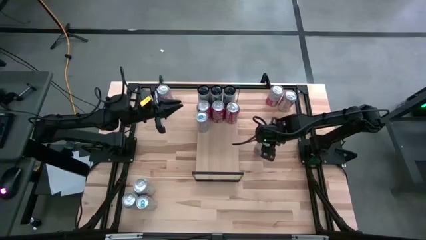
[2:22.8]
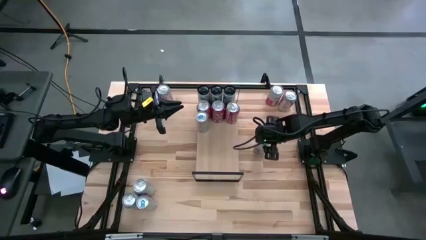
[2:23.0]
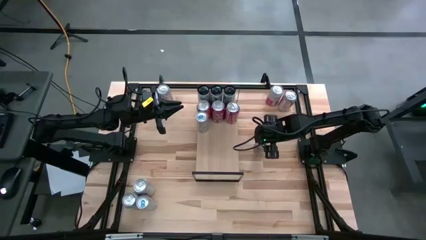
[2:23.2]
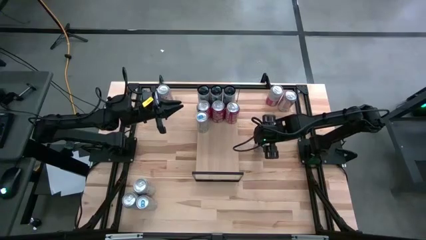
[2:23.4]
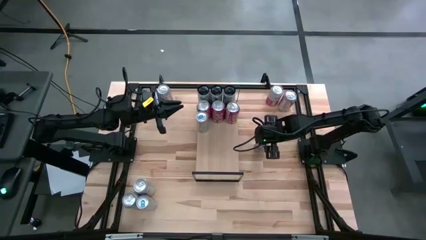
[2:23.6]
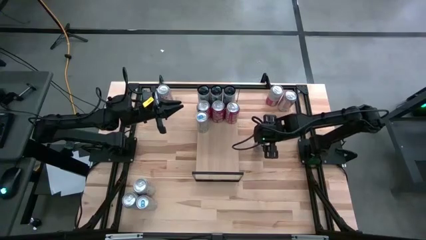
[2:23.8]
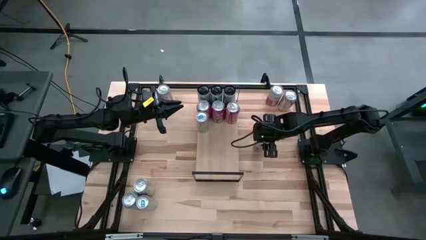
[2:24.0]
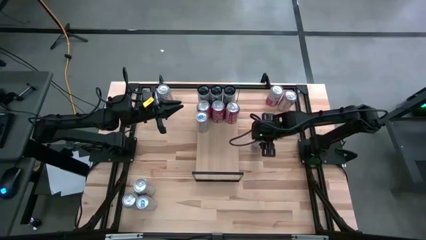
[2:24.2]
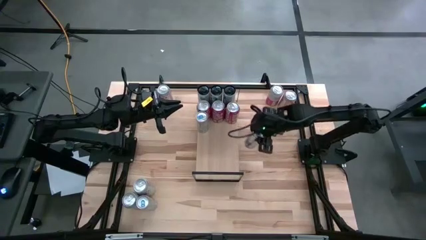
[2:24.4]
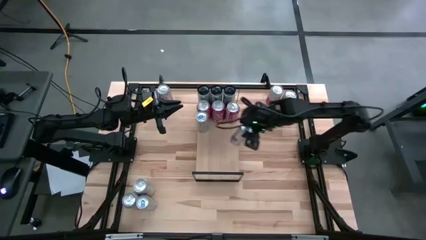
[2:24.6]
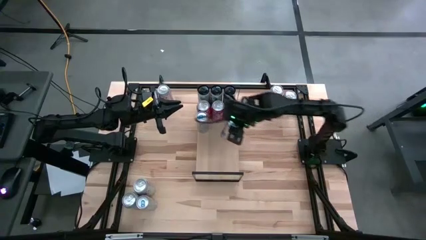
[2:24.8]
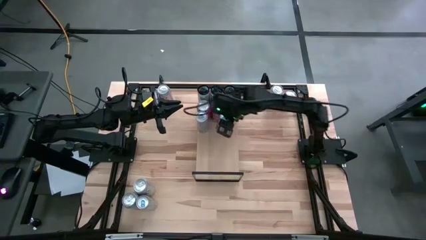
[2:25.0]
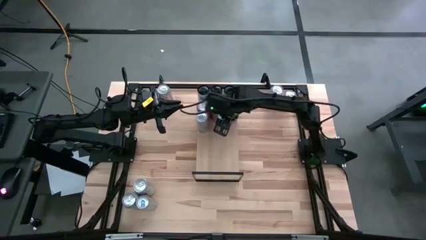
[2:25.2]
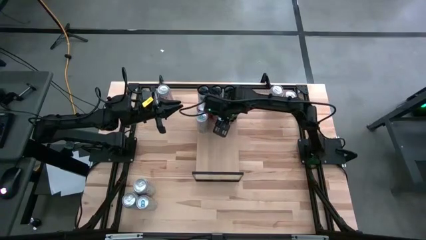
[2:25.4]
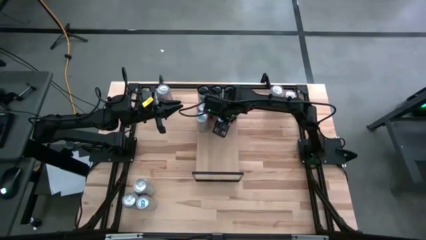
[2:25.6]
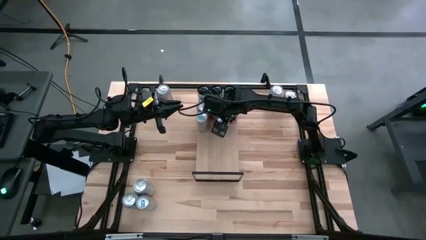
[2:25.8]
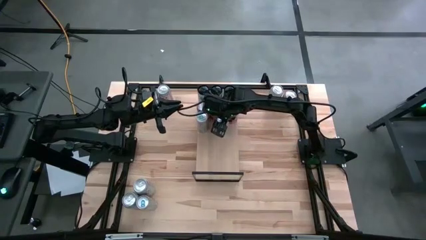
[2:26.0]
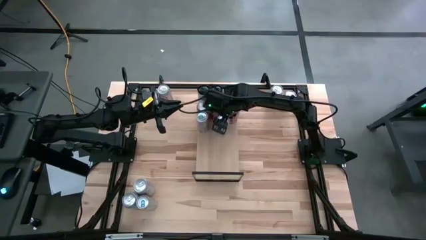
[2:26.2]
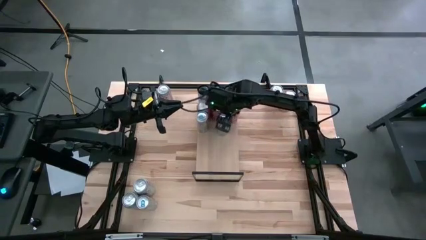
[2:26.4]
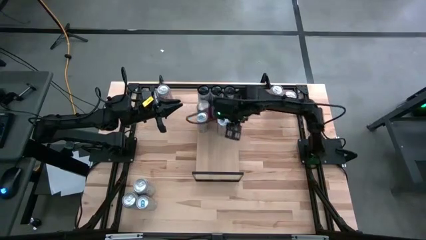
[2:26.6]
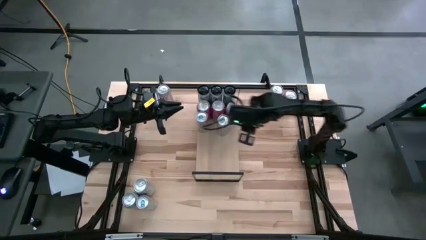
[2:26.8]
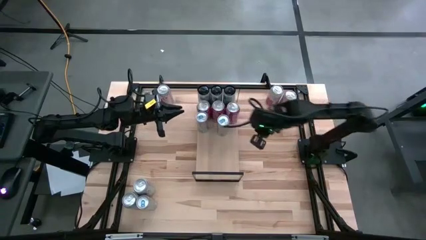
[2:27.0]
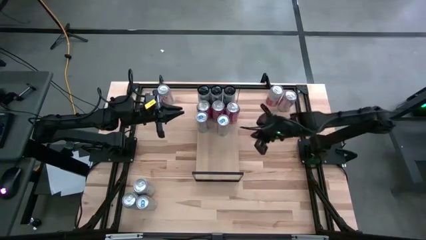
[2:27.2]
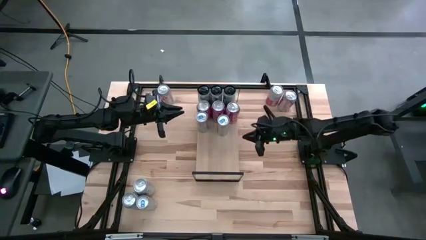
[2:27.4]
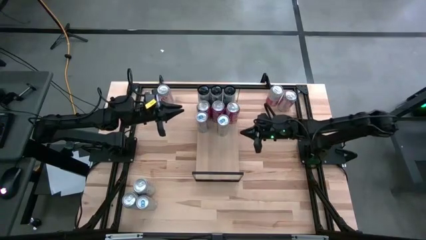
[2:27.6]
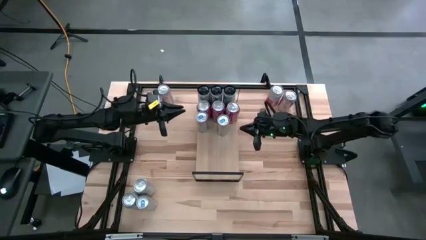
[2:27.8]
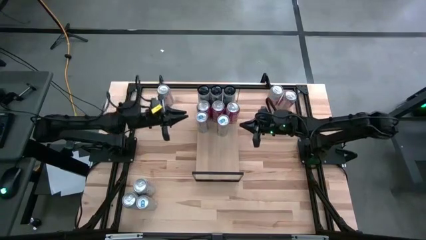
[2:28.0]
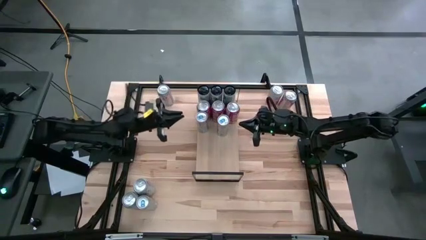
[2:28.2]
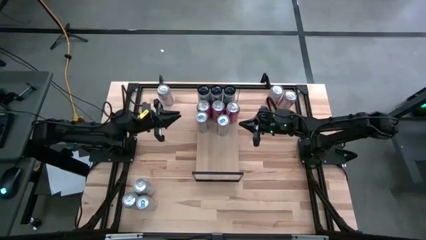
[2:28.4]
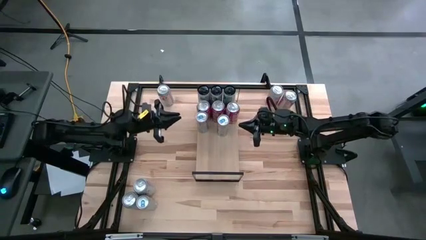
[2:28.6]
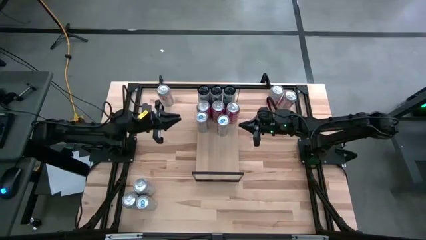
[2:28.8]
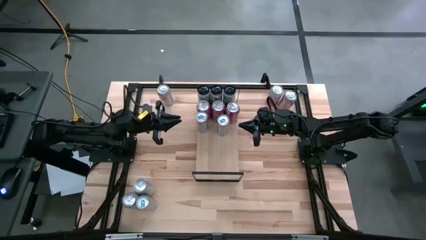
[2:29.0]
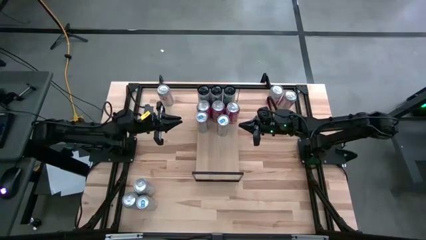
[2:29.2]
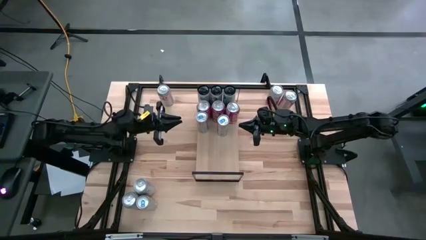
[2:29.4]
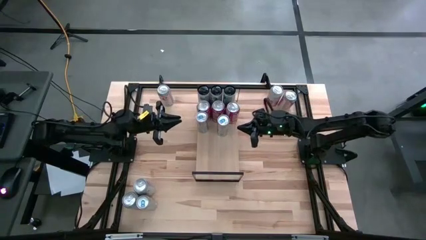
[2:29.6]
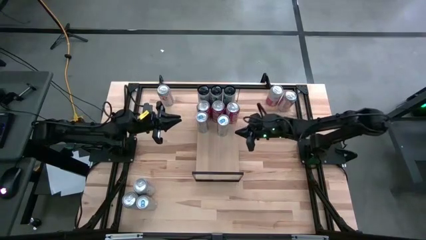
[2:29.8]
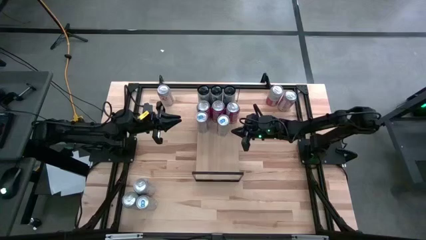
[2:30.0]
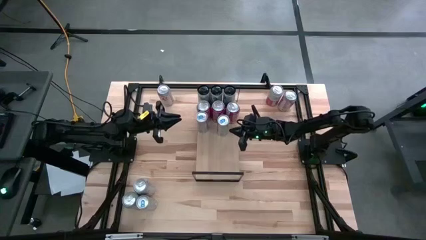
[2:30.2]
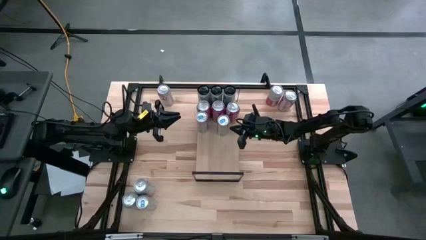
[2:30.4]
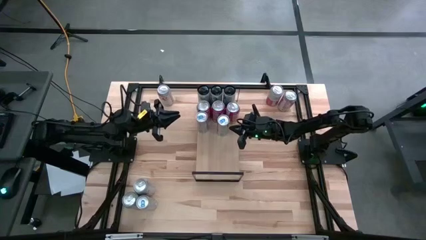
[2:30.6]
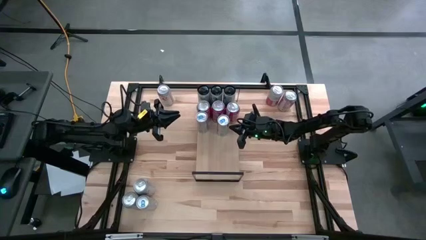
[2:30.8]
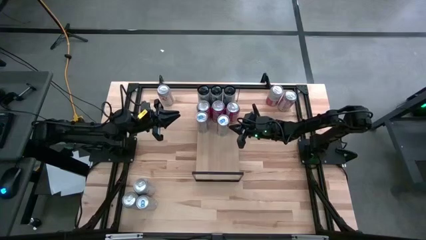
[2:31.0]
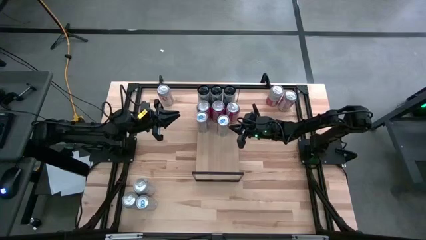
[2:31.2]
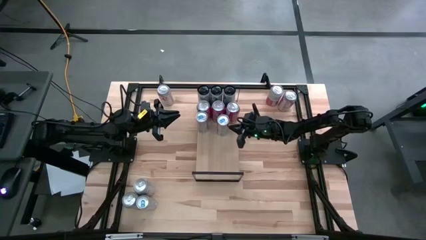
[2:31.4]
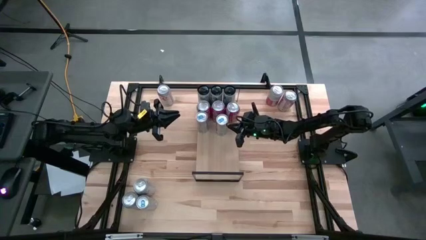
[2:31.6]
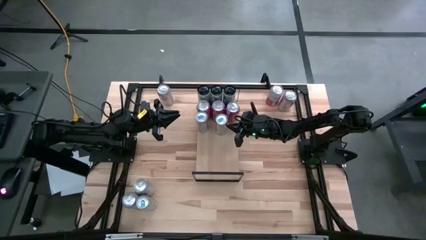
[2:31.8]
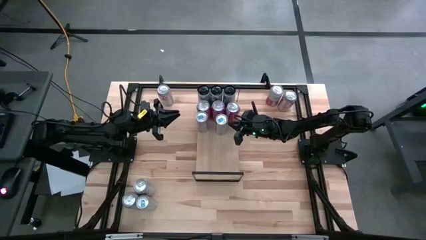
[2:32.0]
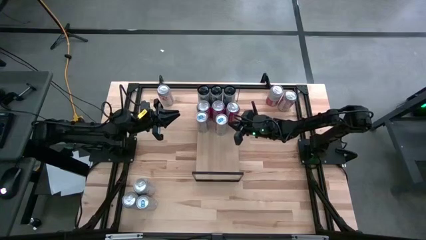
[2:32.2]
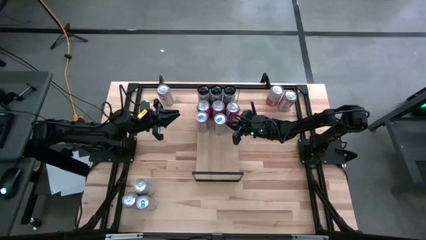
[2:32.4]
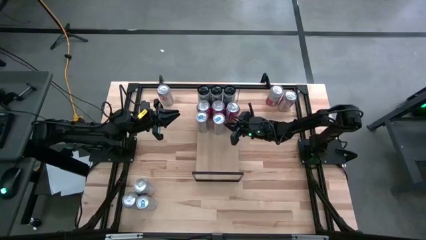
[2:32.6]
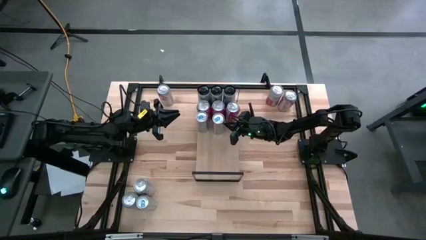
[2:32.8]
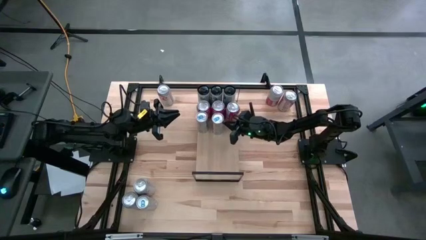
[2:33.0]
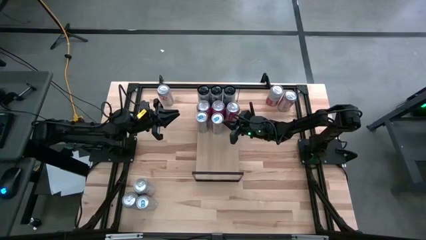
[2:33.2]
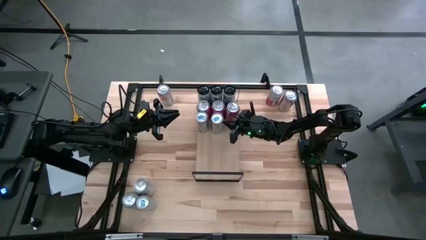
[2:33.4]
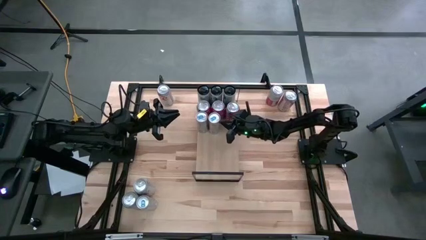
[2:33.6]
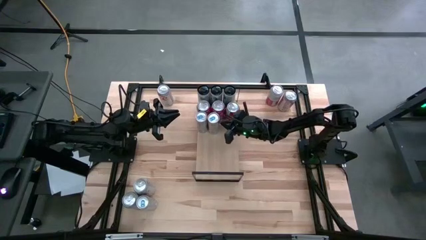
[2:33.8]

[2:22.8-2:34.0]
Task: Place canned beverage on shelf
Put the right blue soda can on the shelf aligned with the other blue soda can

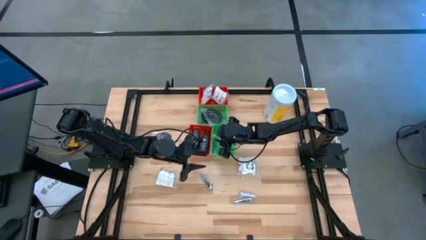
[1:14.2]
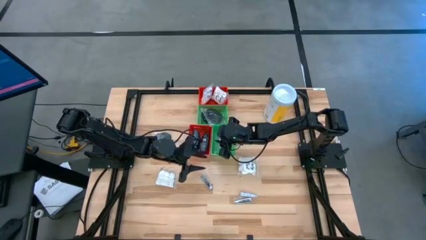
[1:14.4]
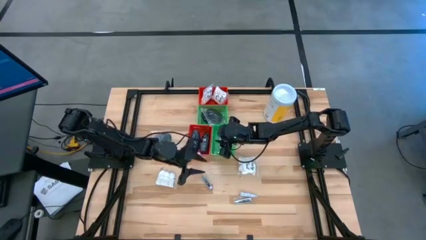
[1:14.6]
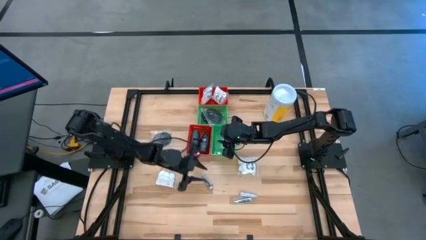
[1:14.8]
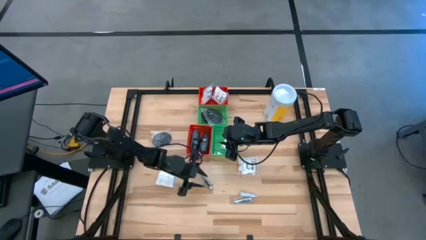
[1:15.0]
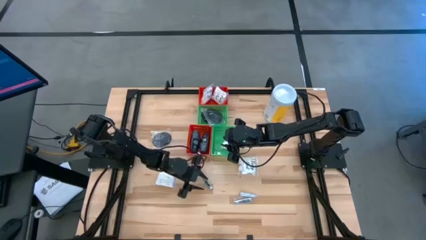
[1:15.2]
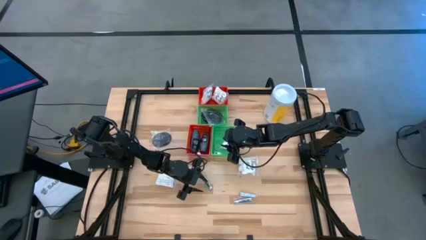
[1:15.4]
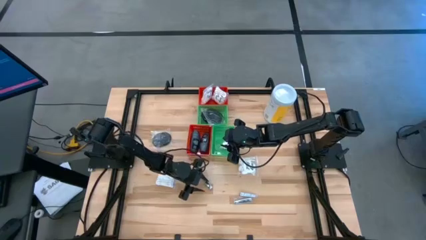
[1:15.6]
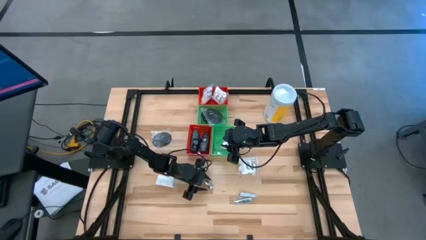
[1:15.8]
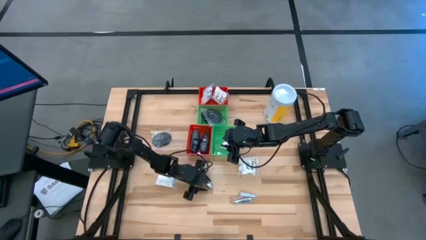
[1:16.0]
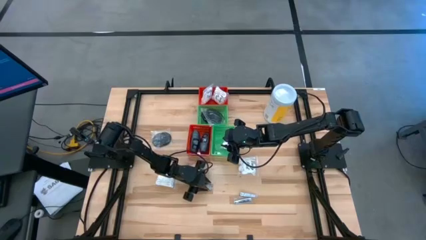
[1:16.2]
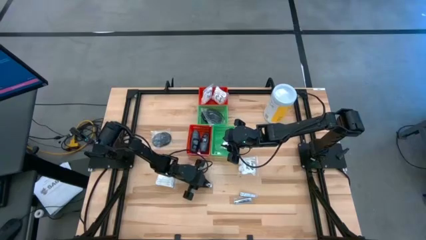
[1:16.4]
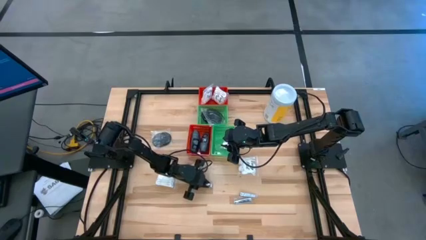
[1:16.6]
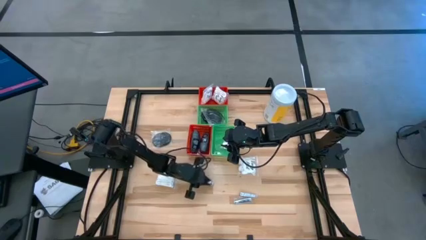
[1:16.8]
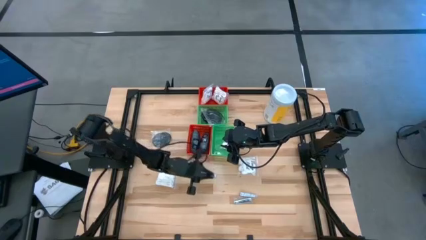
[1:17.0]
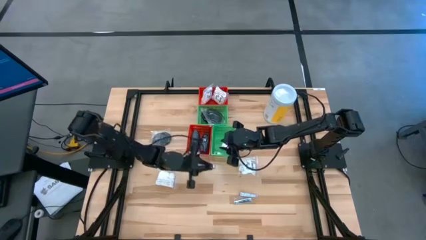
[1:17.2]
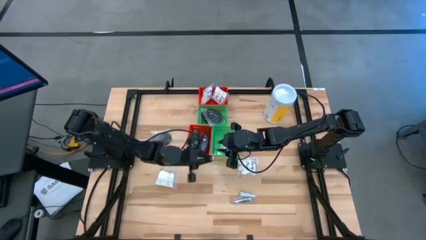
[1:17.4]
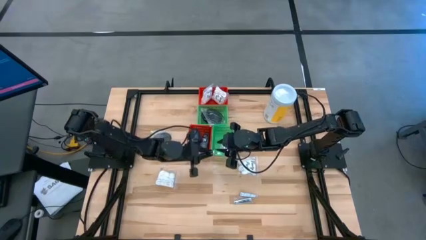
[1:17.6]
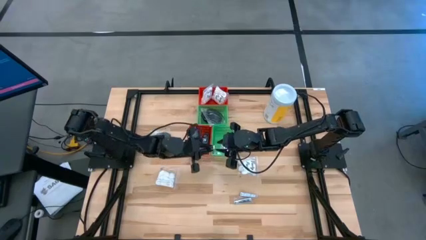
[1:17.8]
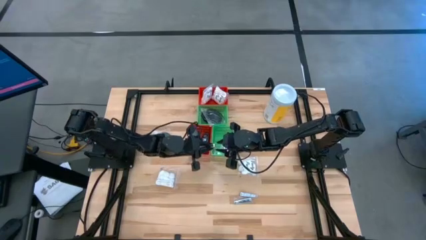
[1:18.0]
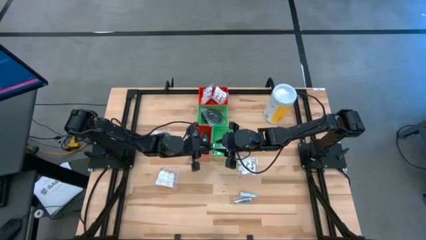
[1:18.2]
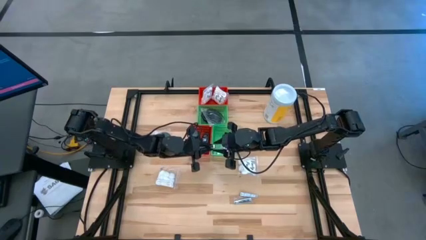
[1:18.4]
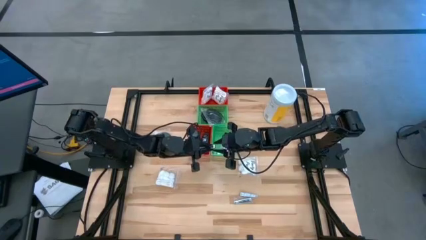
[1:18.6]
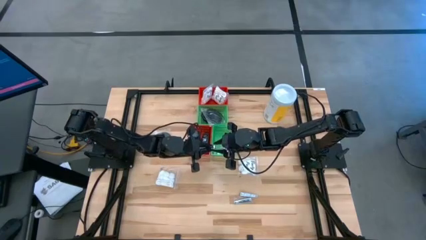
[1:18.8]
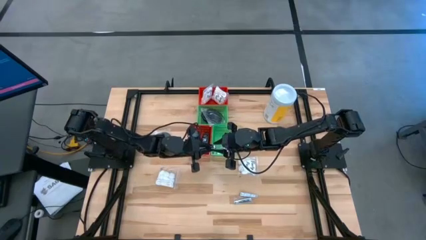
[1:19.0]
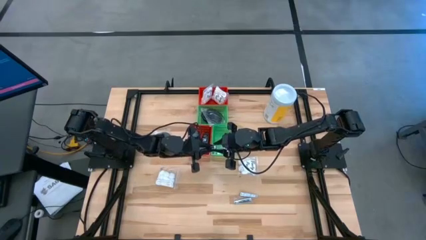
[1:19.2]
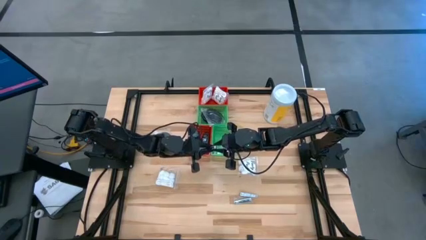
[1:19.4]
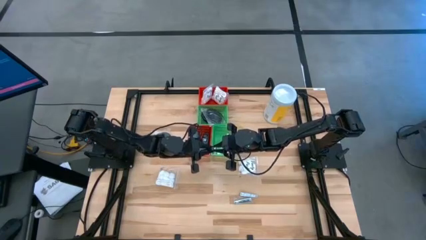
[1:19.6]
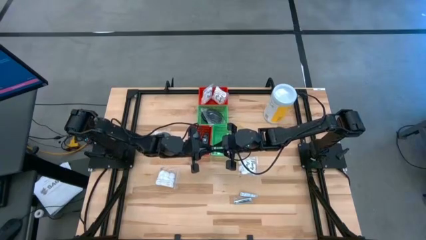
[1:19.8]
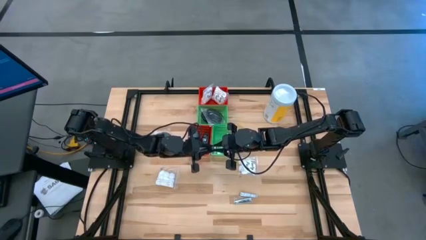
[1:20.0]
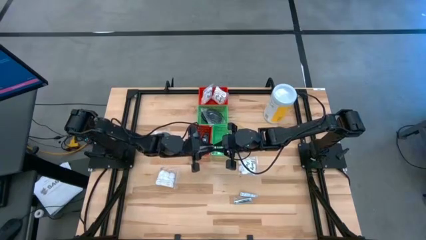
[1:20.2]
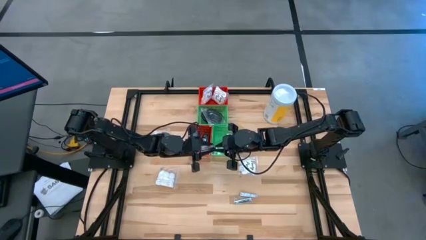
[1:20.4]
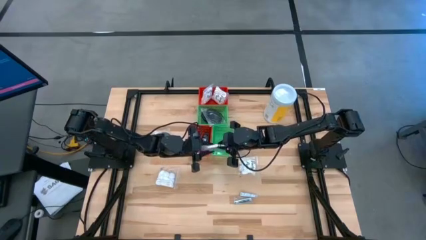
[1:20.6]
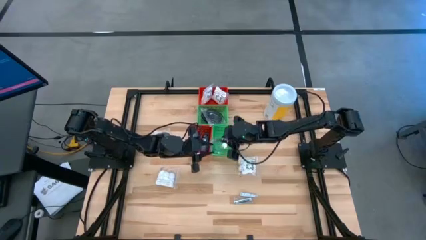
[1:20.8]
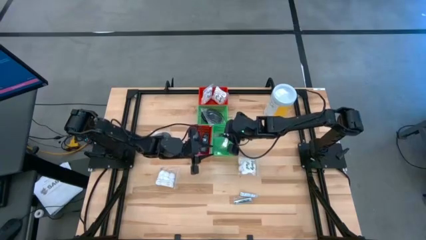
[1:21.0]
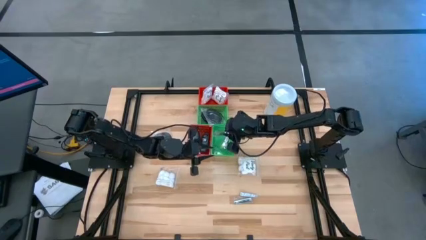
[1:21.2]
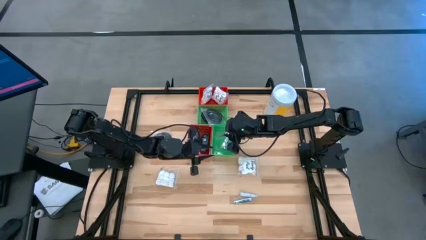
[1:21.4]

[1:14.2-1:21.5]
Task: Pick & Place Travel size toiletries
Put the silver nail cutter into the bottom green bin
